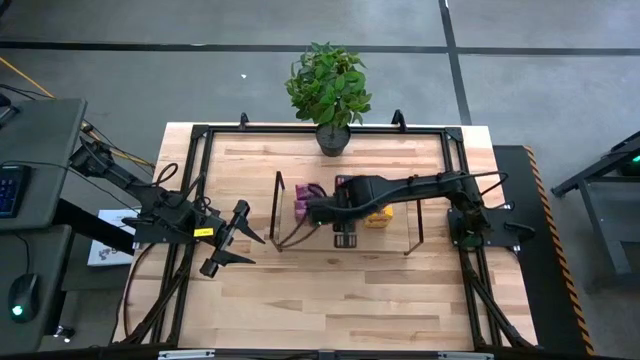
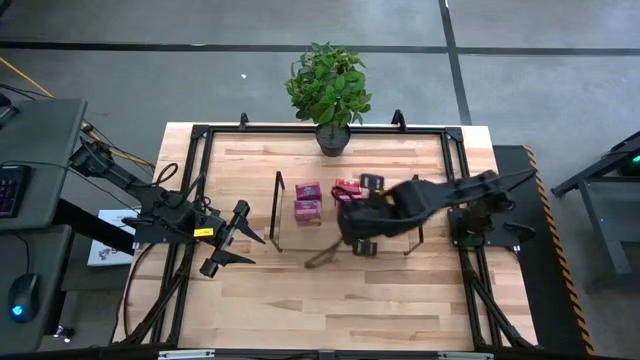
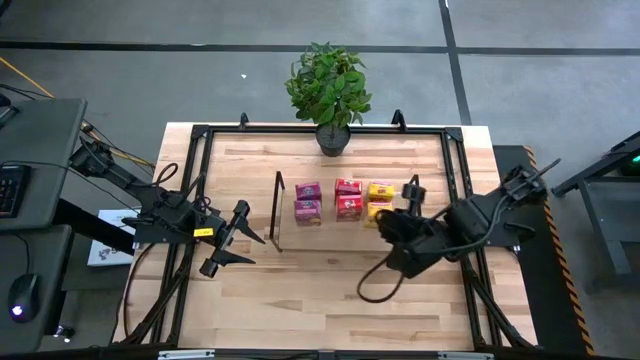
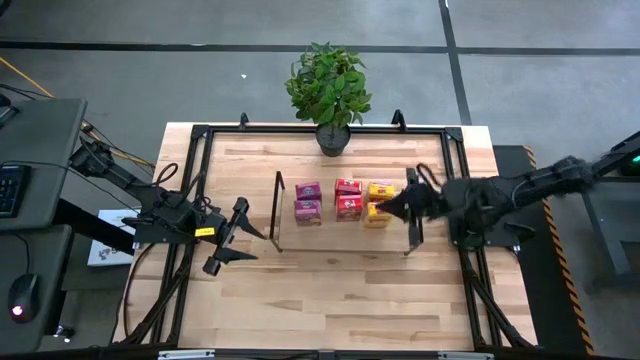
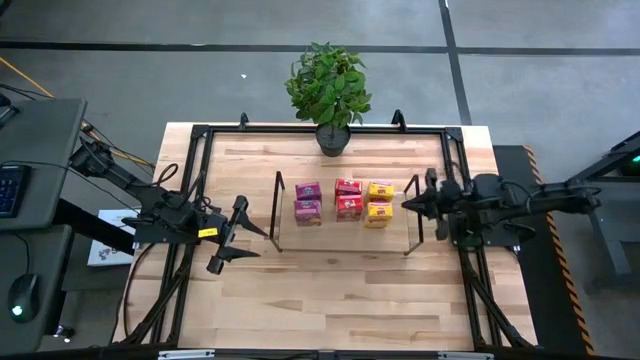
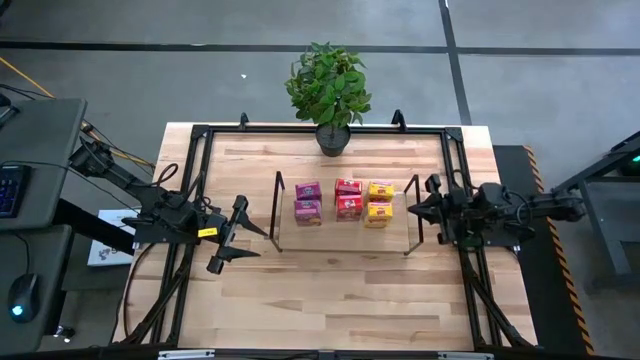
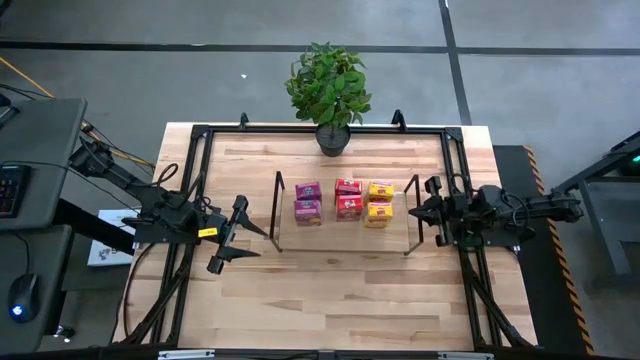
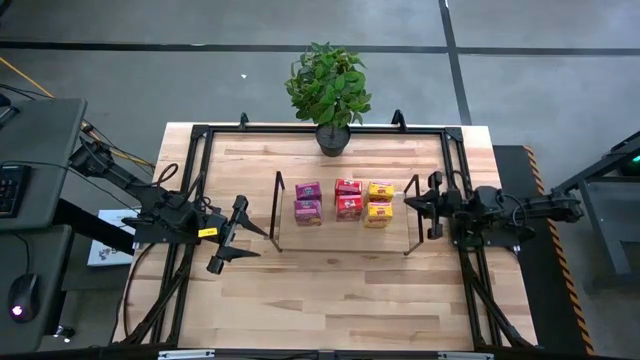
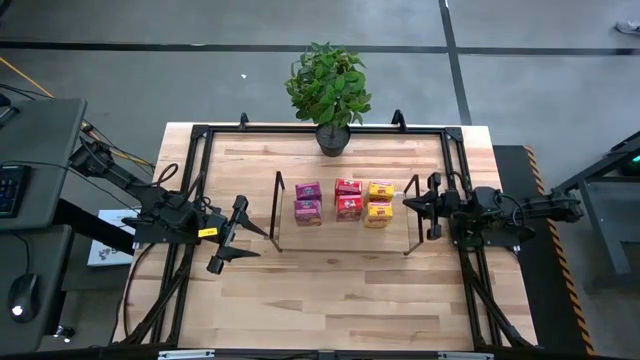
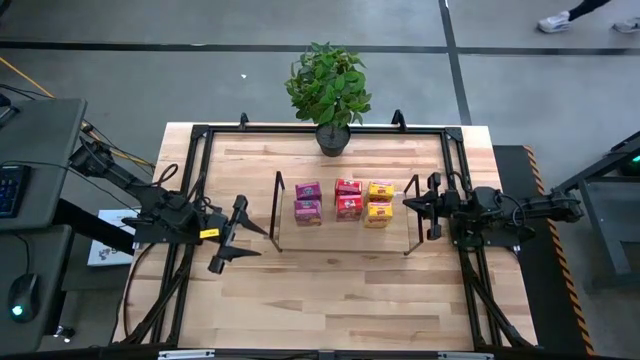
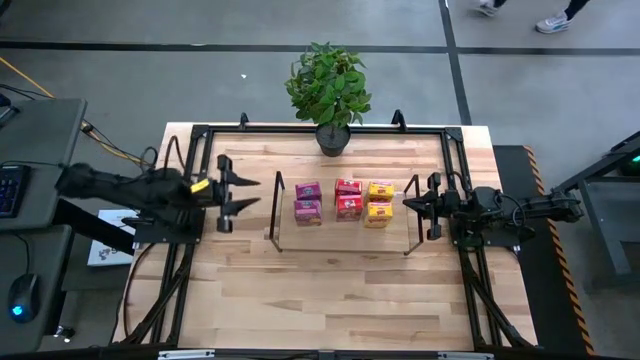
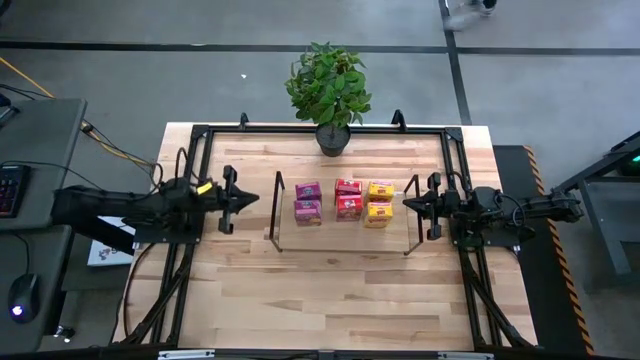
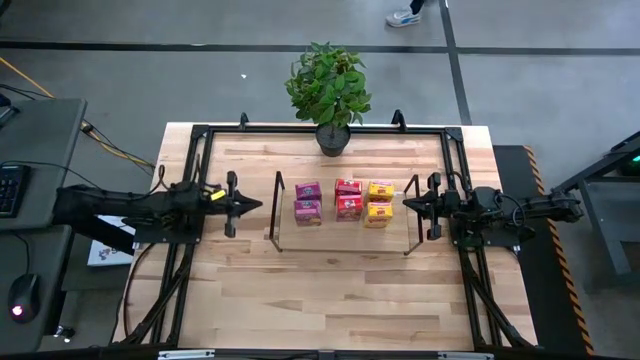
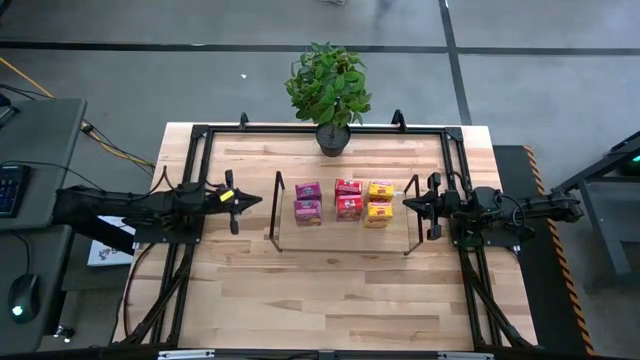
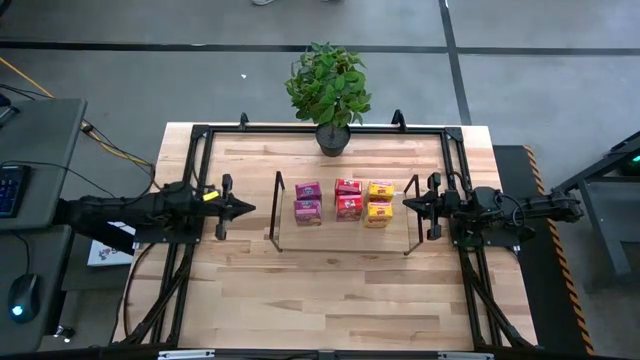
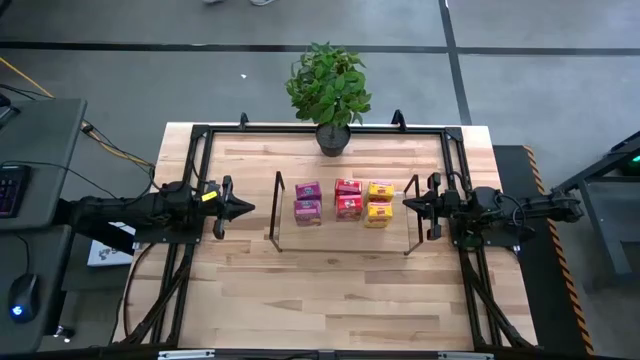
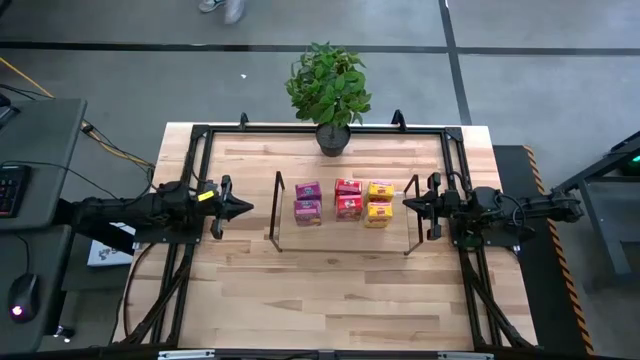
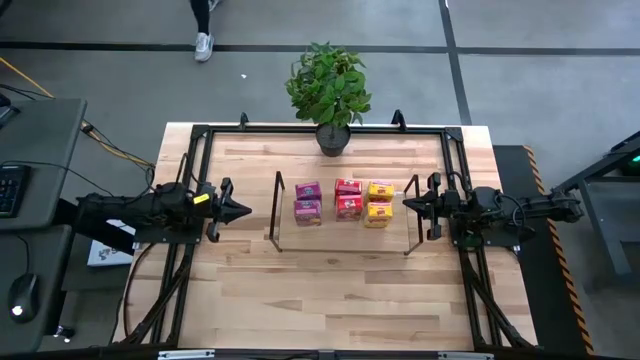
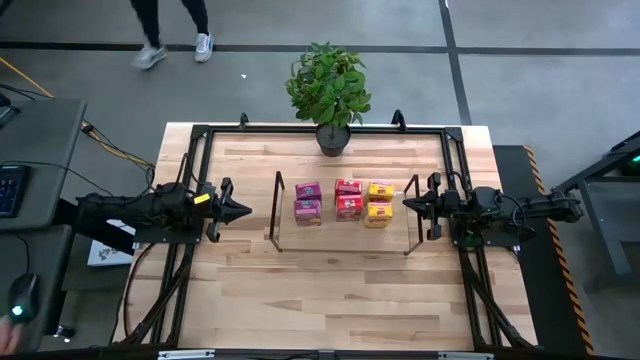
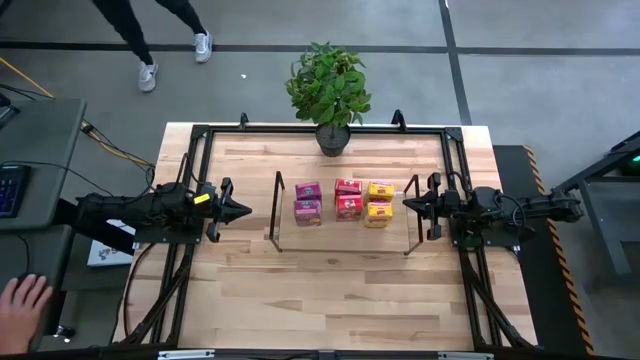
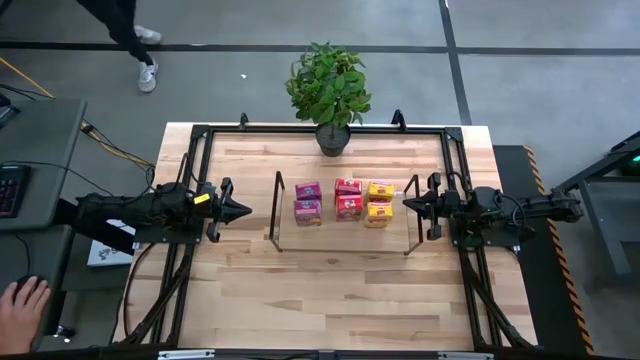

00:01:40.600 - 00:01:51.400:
Task: Stack cereal on shelf
Return to Home Position

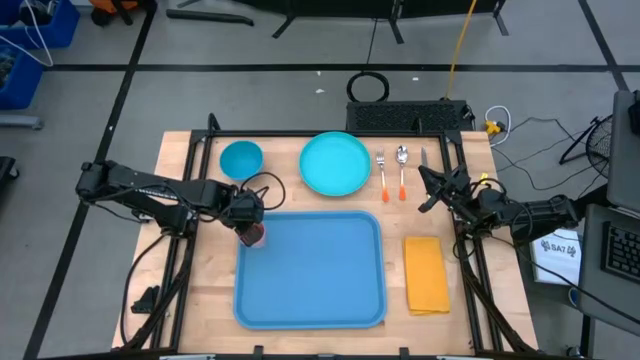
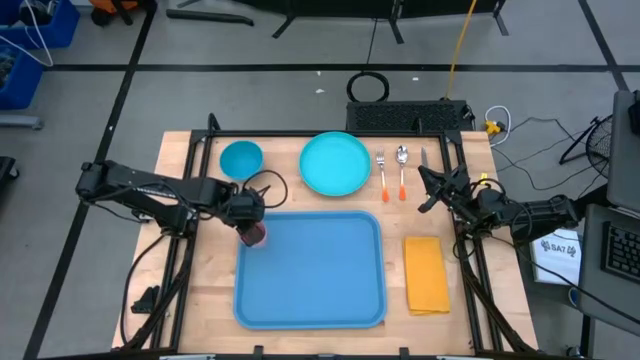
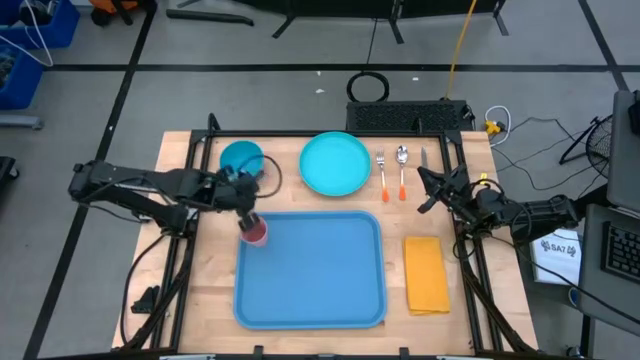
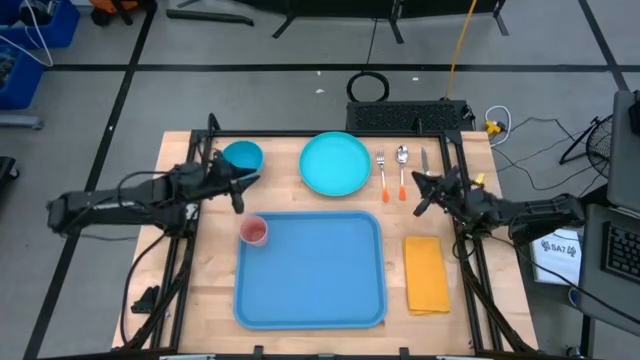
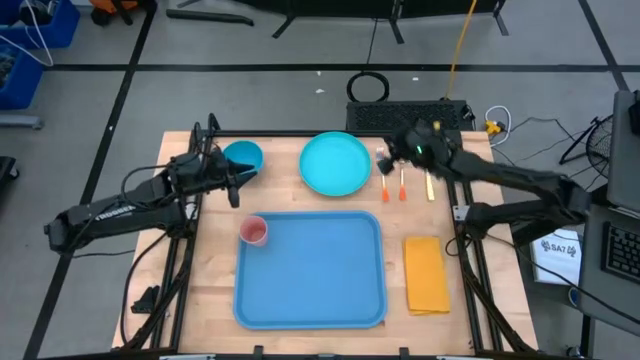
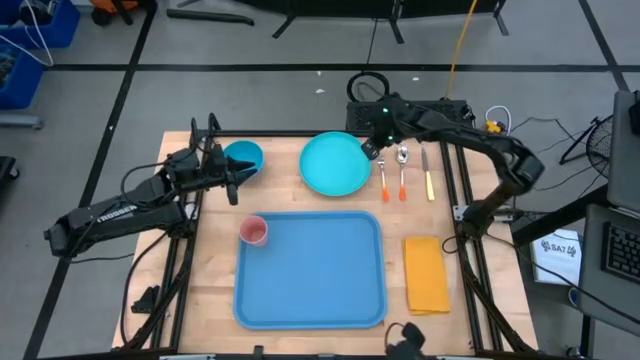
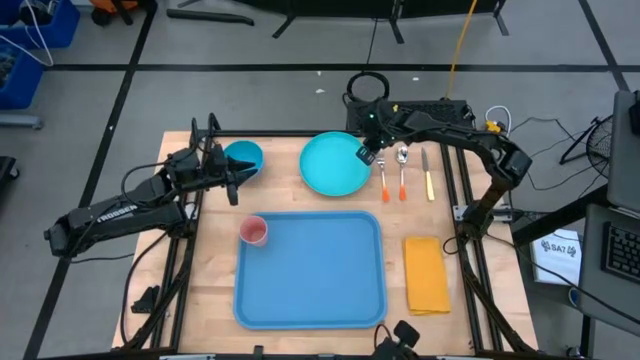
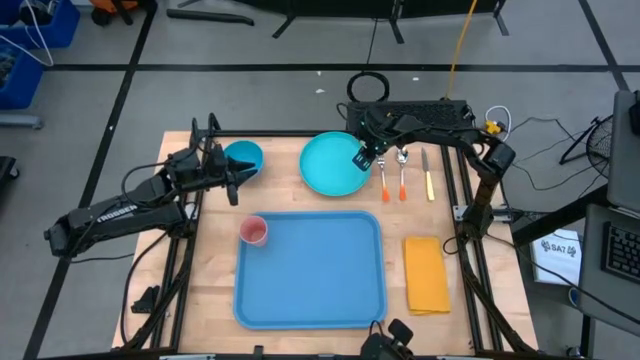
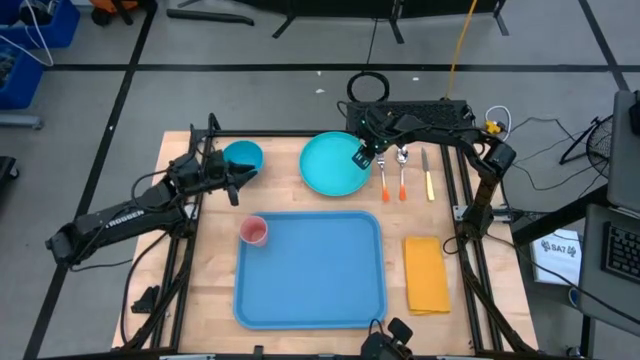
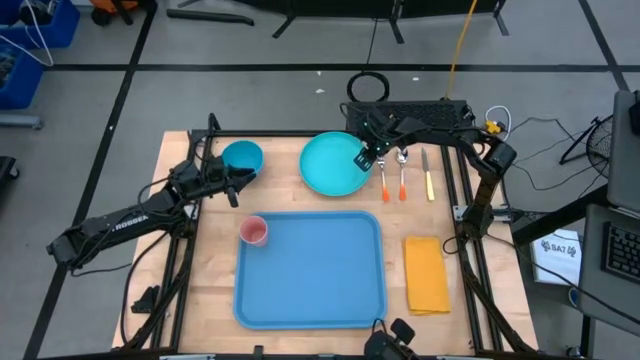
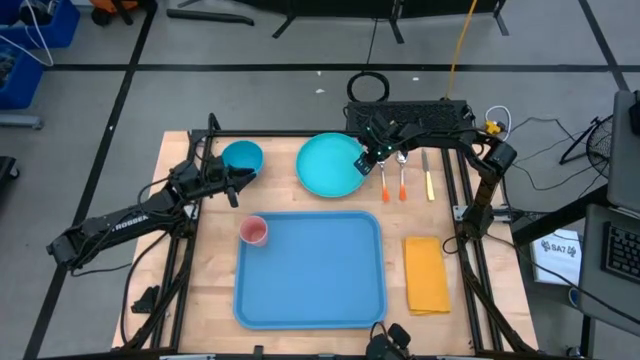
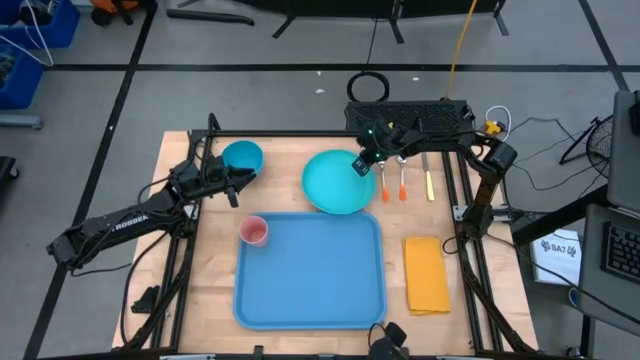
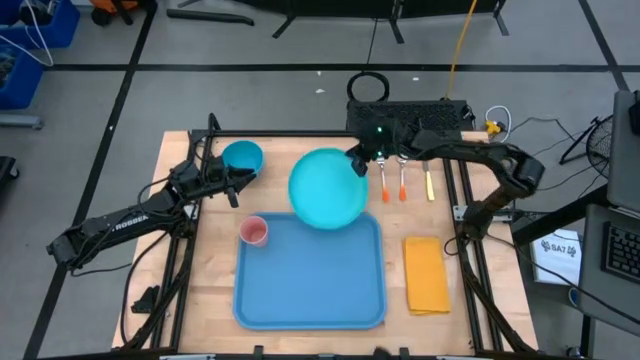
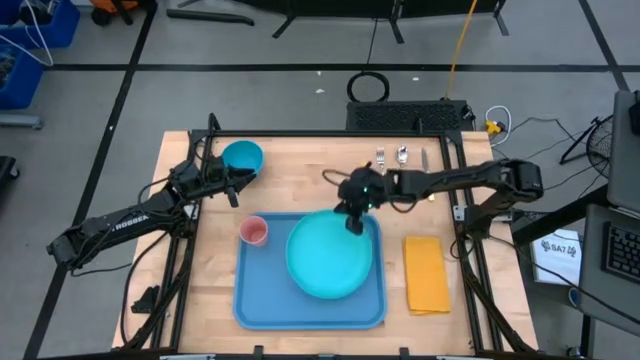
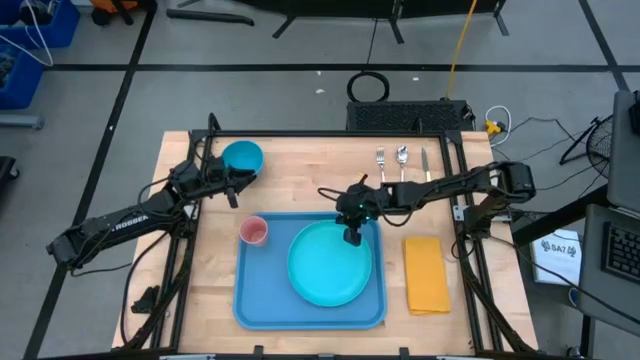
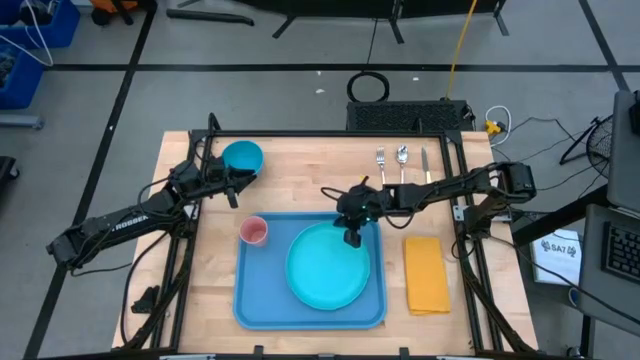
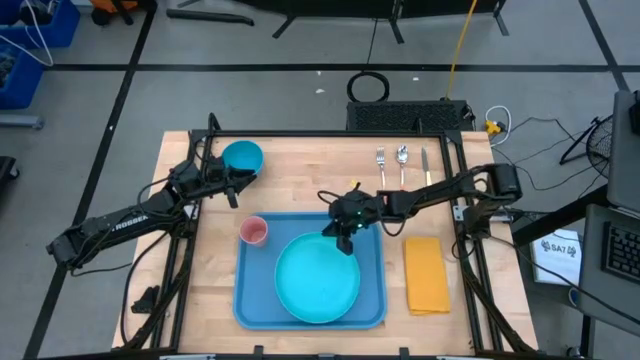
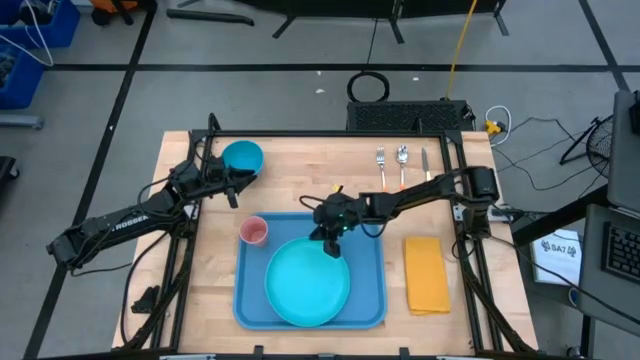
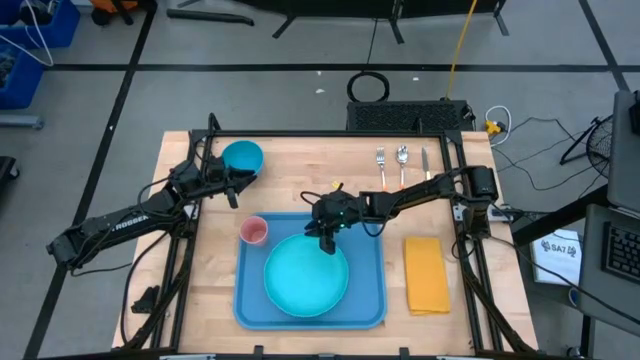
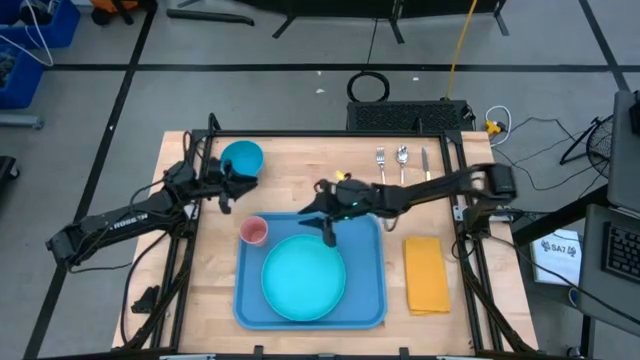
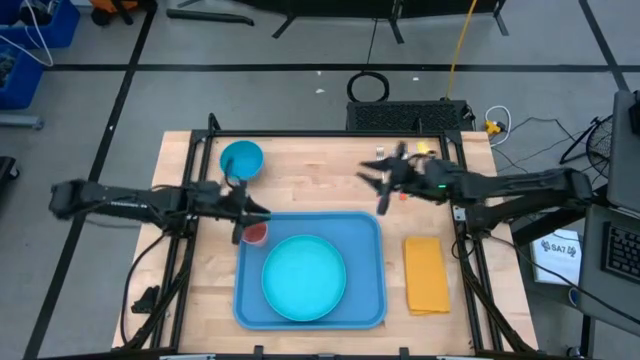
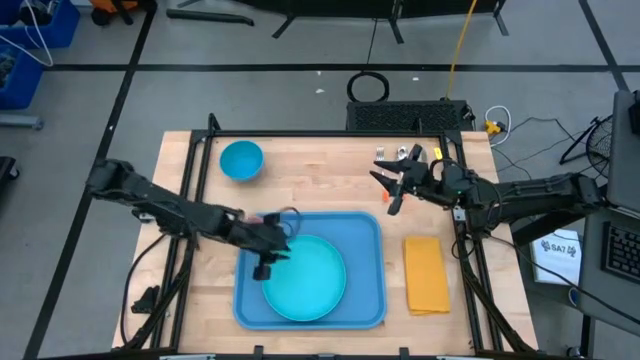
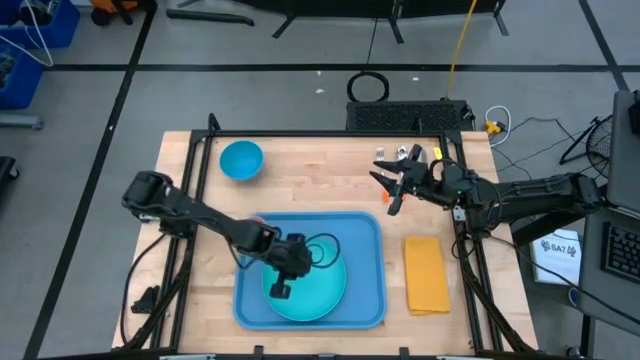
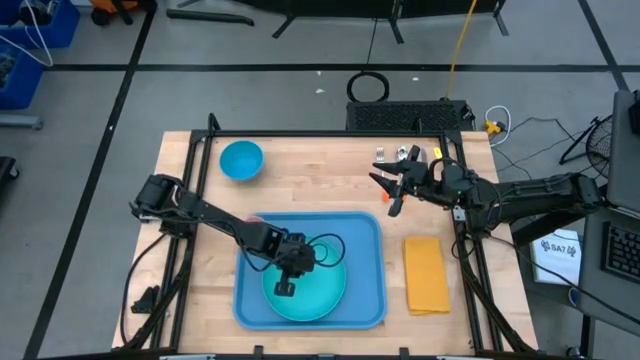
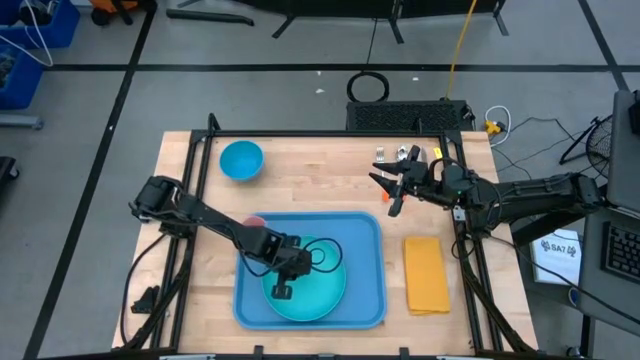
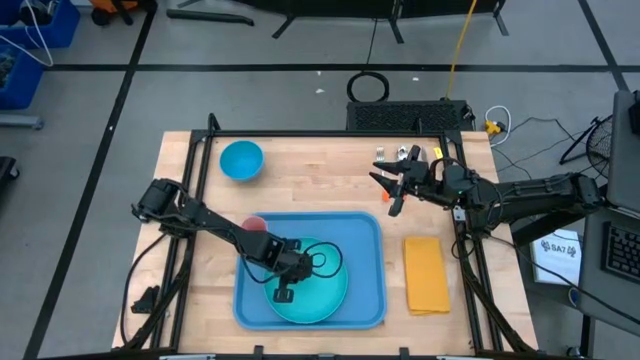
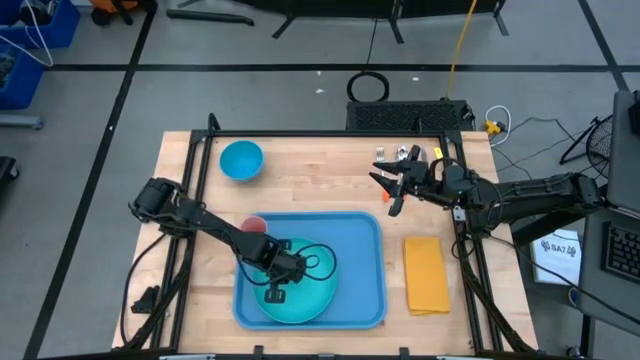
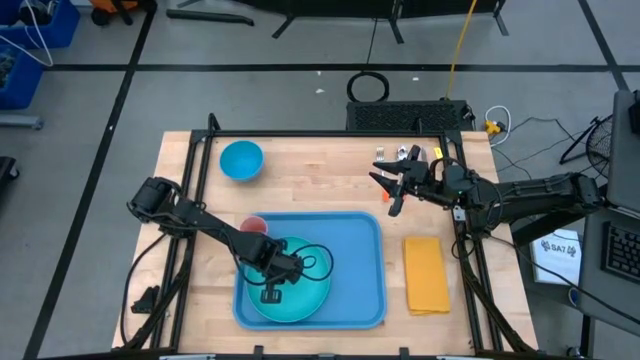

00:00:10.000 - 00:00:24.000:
Task: Set up tray
Put the blue plate to the bottom right of the pink cup on the blue serving tray
